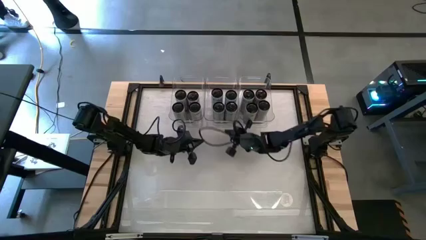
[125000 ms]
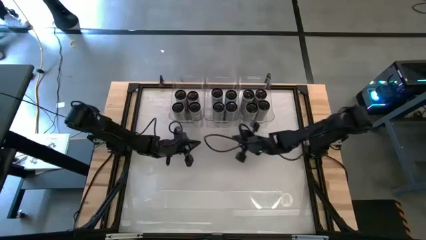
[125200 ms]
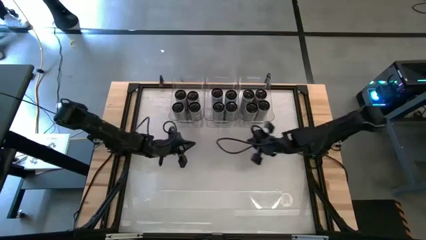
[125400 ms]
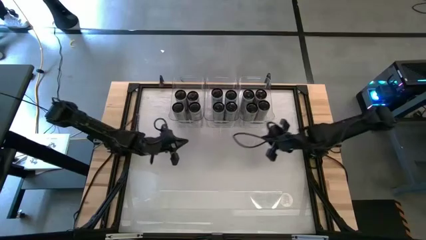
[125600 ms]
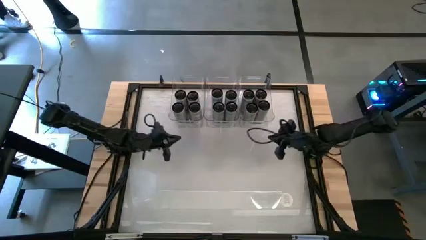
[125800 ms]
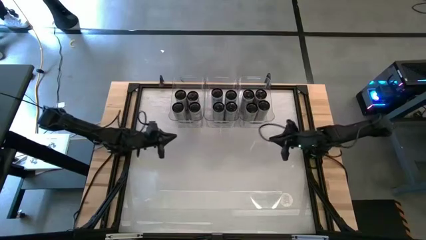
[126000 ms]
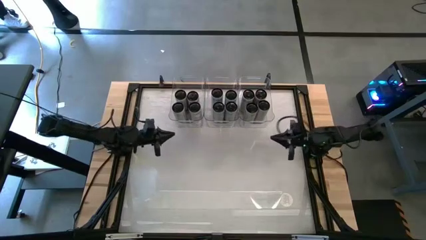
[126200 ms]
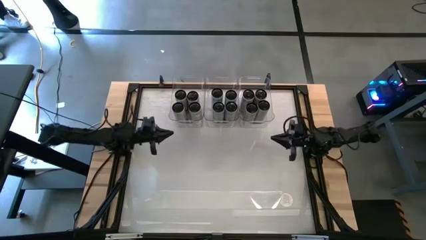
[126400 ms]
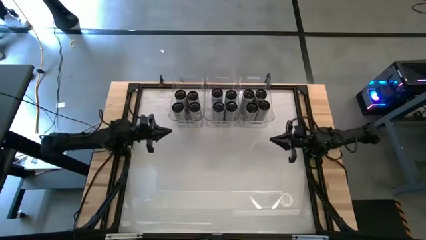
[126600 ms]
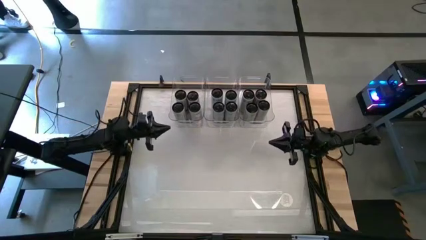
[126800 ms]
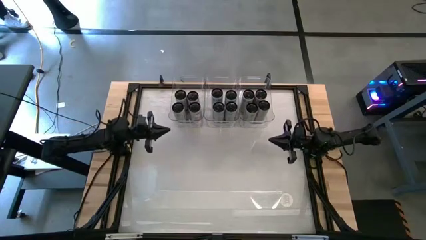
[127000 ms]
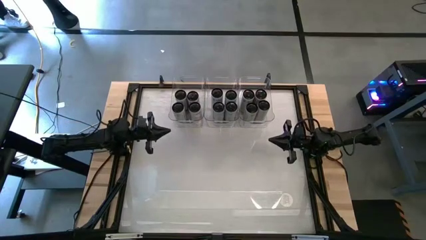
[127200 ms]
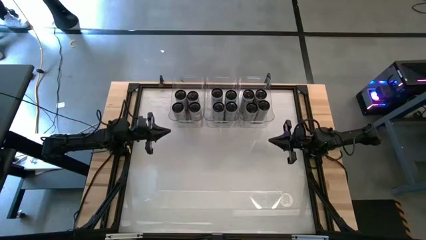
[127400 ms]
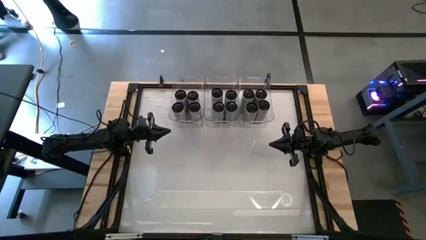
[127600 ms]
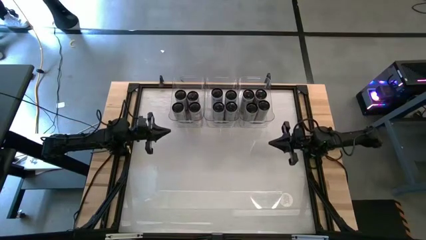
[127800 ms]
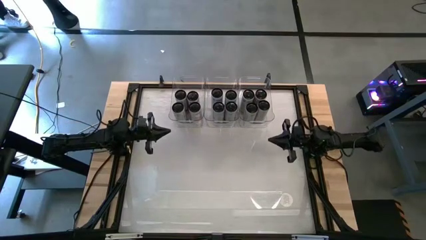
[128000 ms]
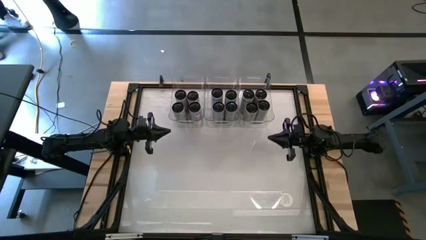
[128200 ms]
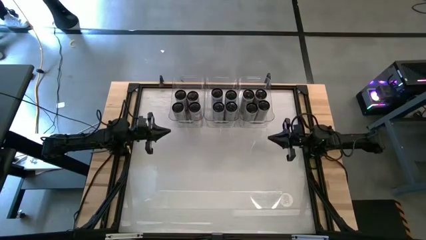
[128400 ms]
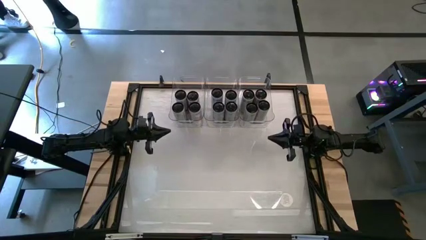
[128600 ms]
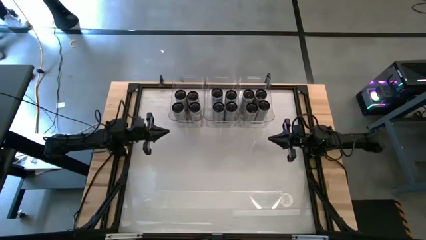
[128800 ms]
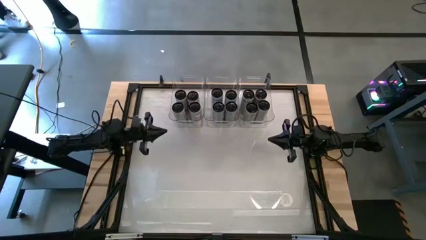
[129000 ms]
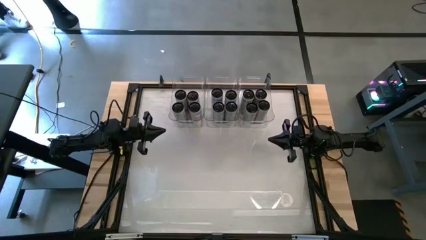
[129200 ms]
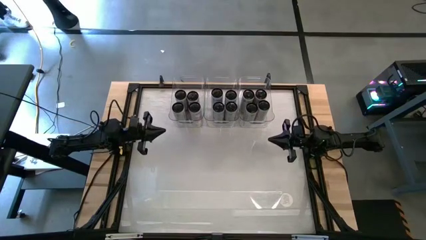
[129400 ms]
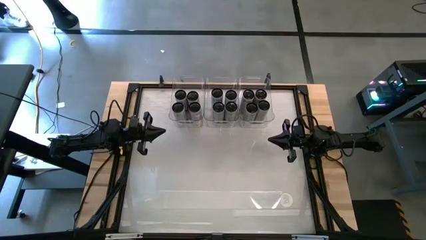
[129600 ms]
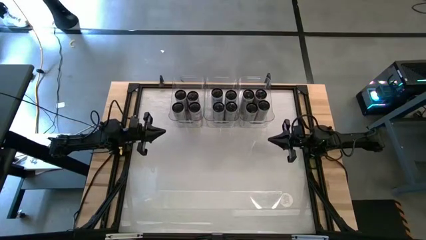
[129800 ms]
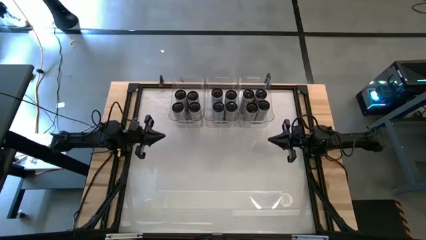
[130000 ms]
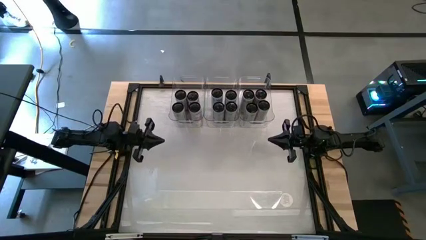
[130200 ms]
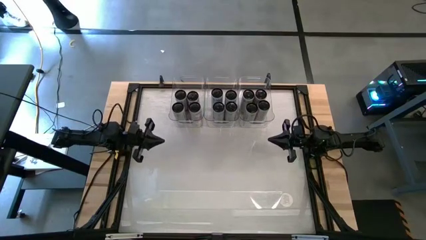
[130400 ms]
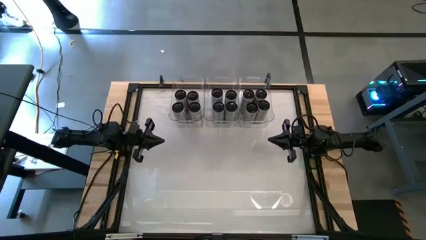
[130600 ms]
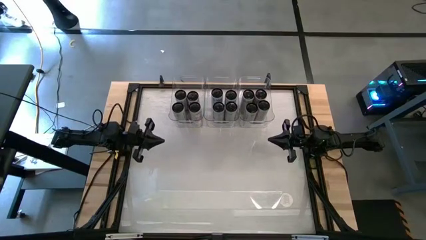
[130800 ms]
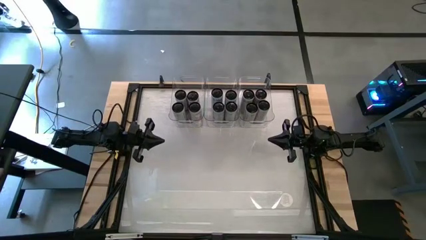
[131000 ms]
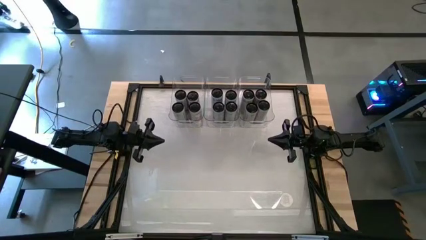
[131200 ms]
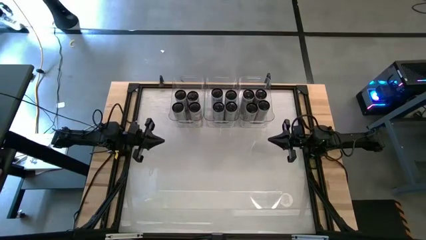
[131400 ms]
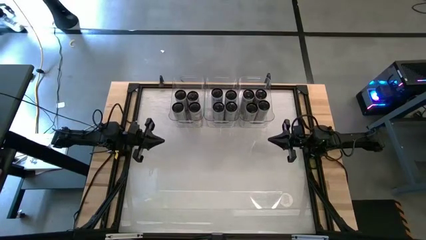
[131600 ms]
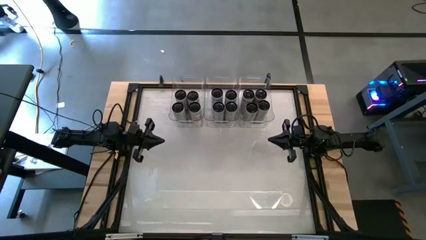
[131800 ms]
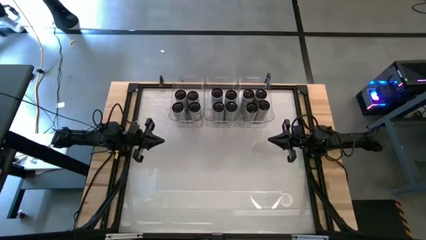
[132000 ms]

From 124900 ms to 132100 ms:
Task: Sort soda cans
Return to Home Position

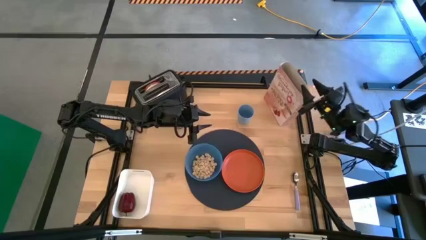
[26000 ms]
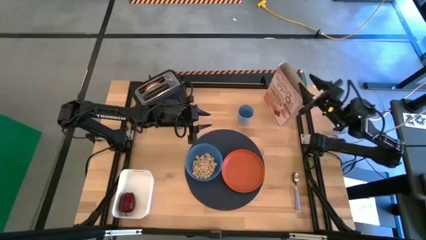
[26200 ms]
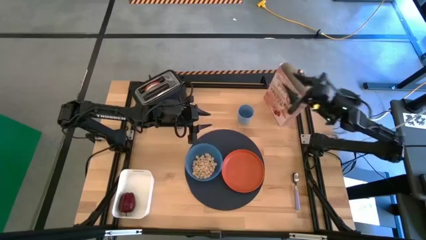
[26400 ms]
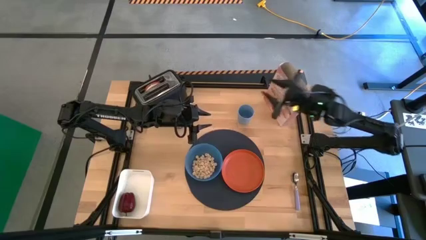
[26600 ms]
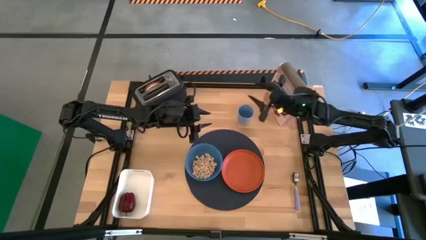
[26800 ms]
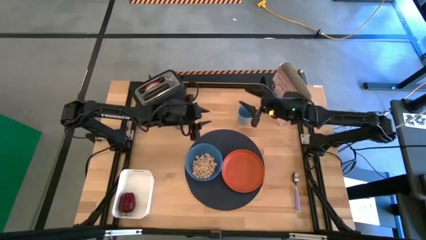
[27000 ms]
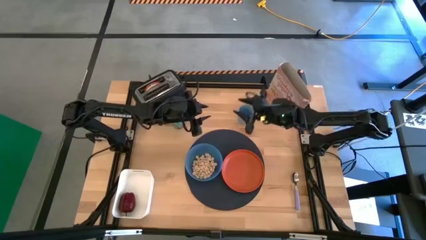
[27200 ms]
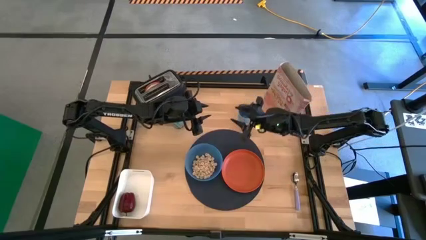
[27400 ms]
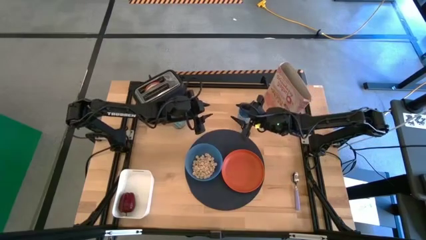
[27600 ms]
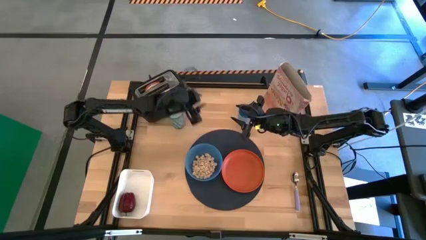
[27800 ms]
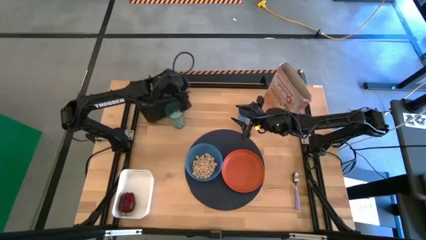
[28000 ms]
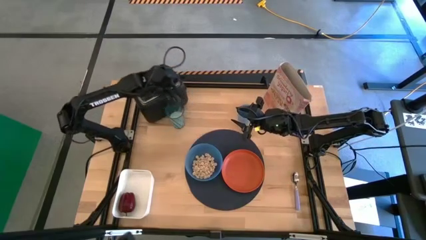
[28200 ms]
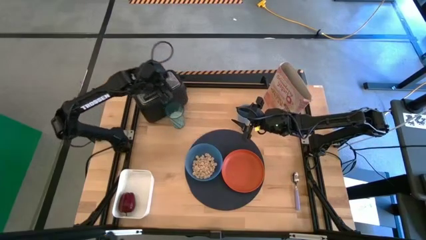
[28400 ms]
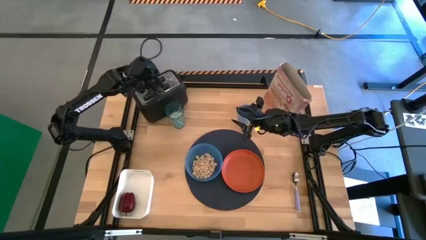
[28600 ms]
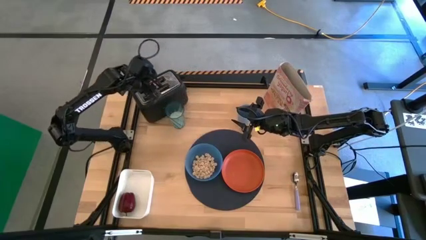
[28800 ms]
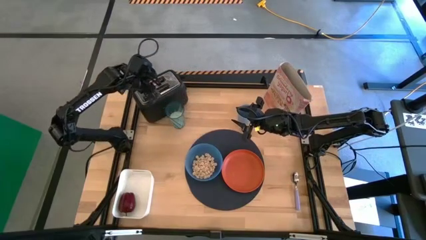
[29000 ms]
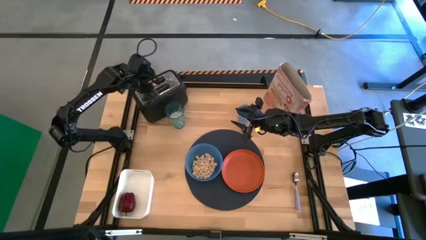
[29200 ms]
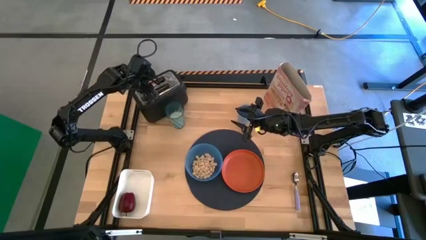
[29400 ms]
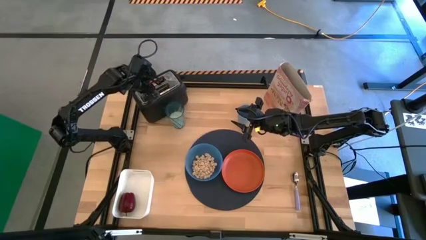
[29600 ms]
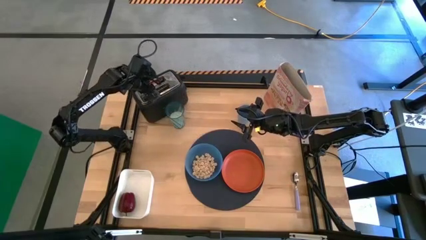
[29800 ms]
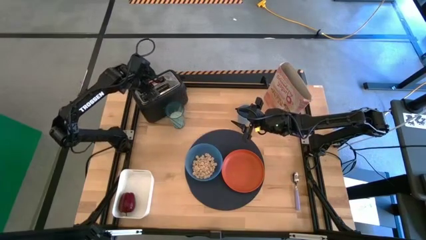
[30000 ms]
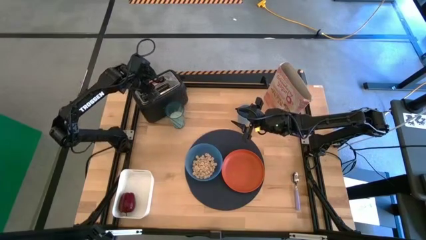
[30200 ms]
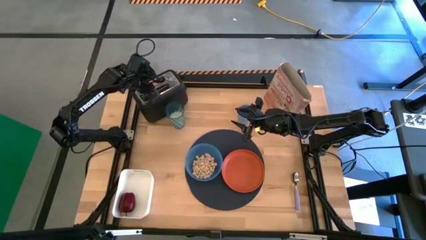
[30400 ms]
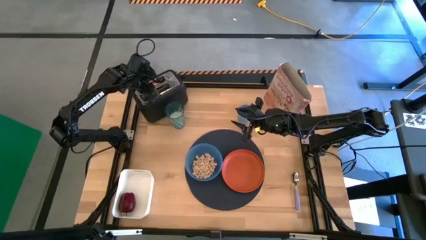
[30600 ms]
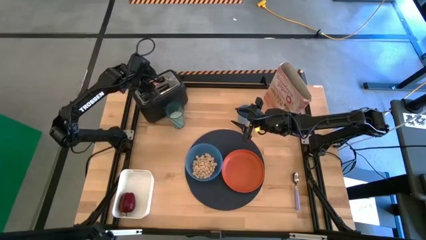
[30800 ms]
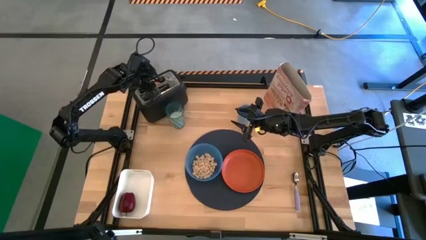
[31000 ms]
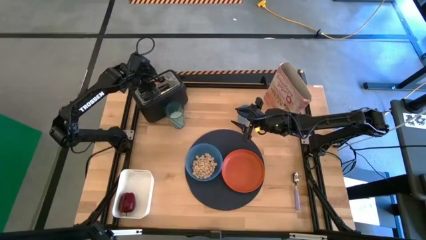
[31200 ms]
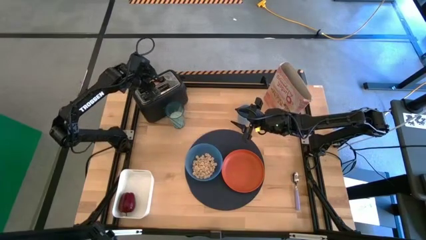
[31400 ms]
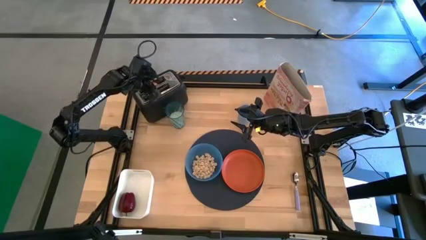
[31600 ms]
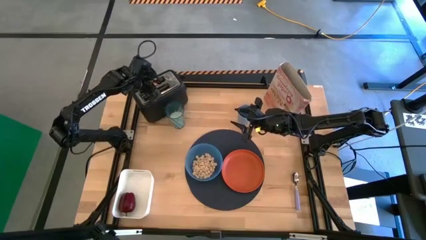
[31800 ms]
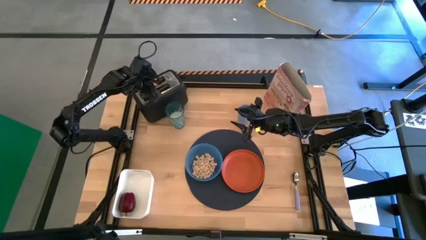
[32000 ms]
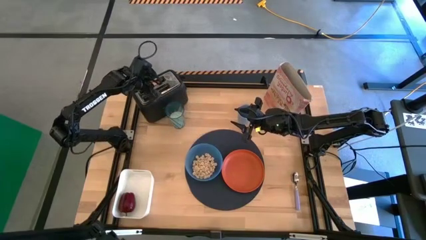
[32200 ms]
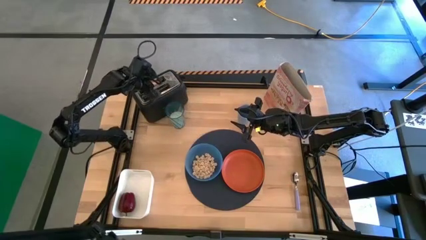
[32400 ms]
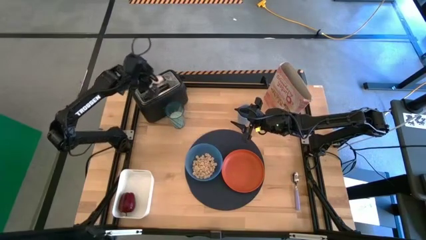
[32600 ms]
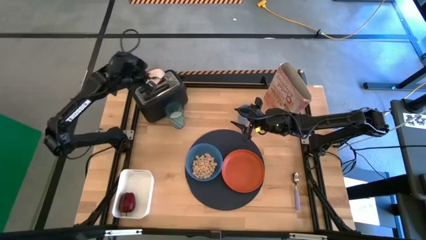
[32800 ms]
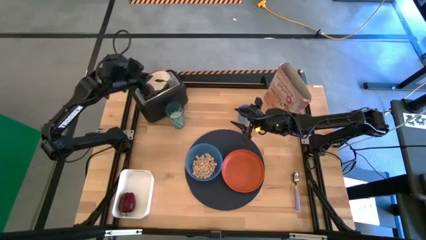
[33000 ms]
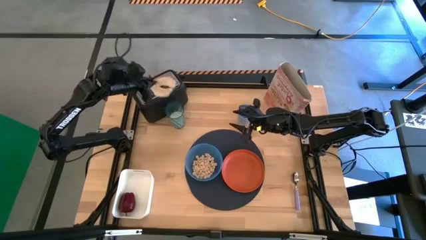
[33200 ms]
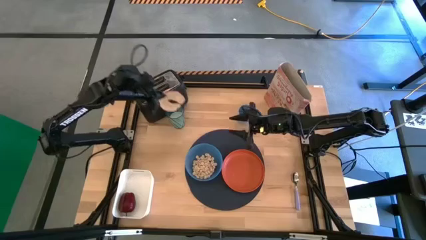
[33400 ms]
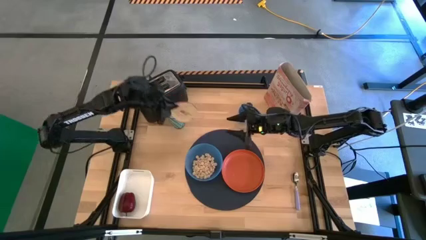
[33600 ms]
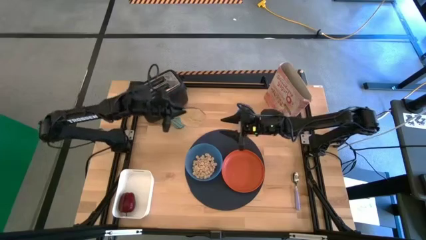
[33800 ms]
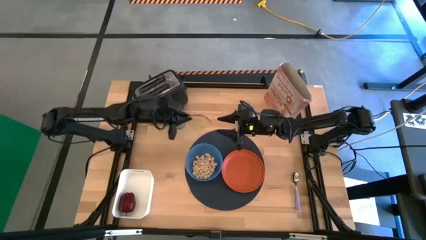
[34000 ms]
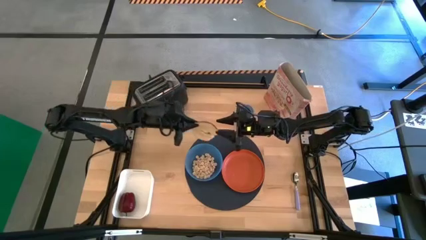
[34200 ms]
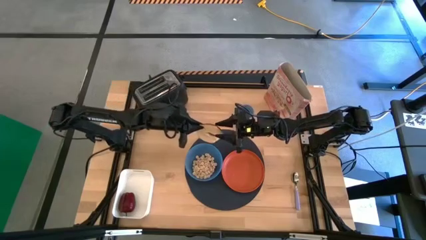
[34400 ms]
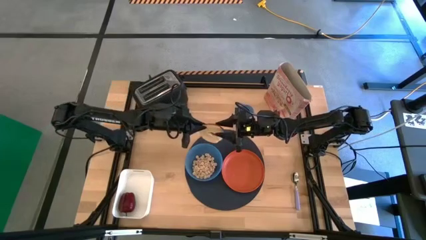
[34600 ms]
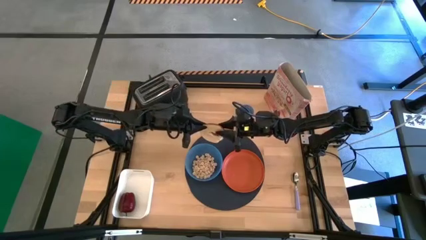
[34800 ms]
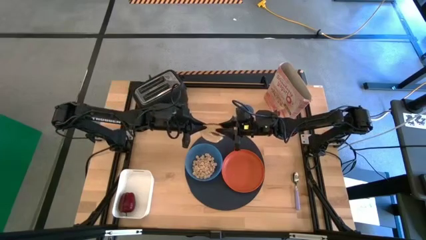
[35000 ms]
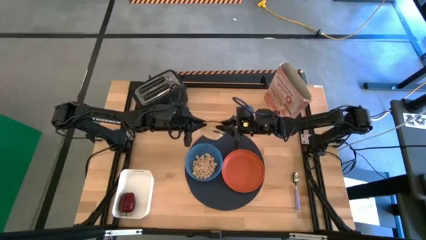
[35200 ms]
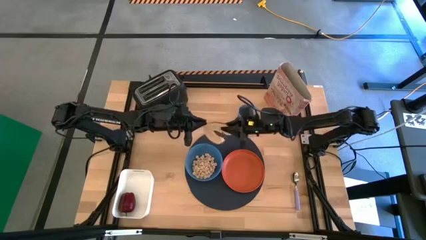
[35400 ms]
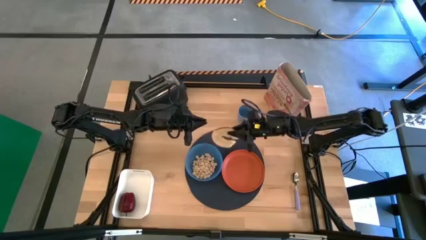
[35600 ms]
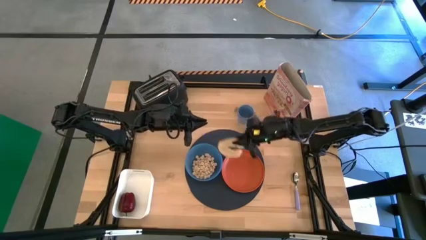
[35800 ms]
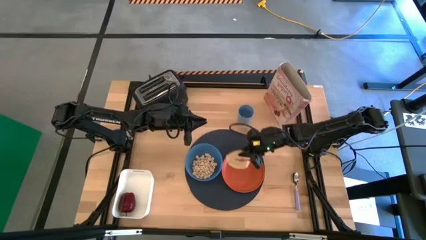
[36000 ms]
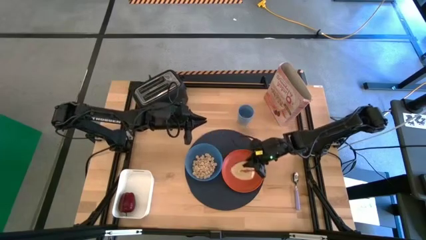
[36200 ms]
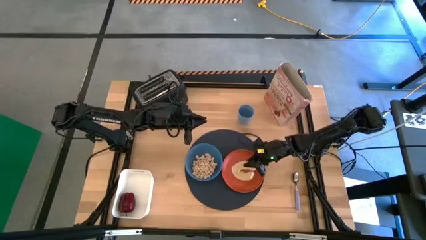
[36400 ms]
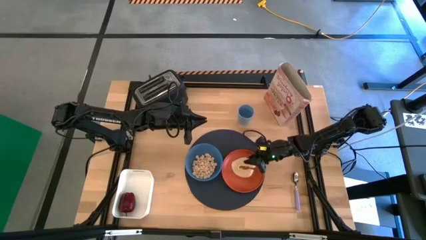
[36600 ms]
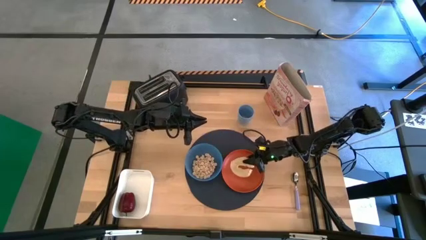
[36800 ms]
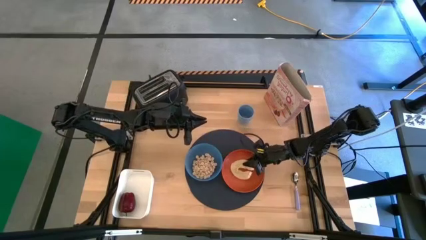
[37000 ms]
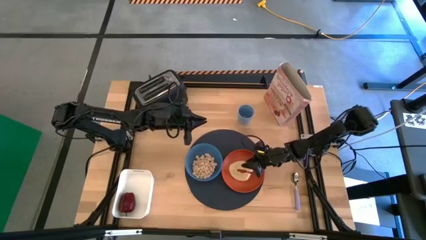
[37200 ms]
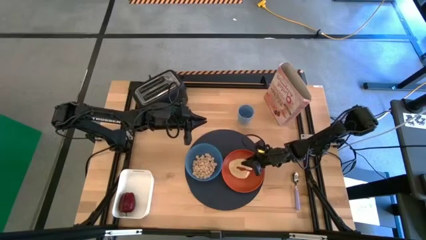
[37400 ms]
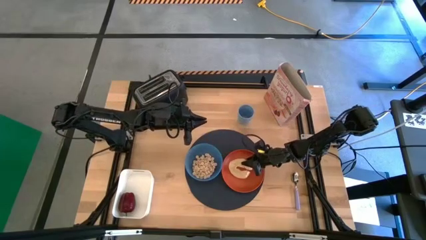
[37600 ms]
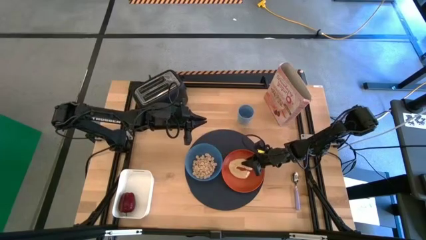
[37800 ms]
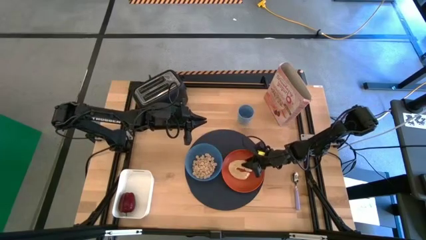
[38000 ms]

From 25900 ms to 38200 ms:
Task: Arrange a breakfast setting
Put the toasted bread from the toaster on the plate
